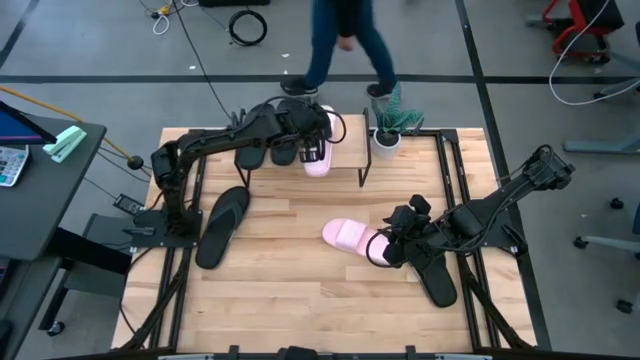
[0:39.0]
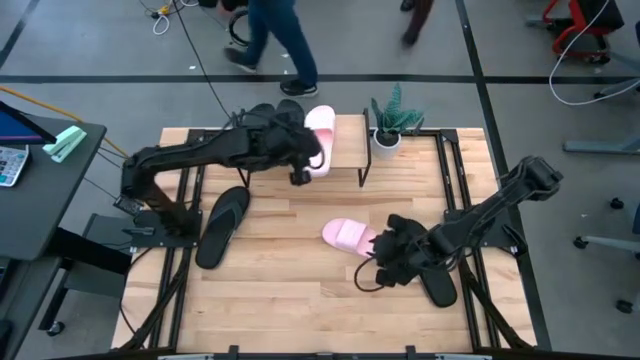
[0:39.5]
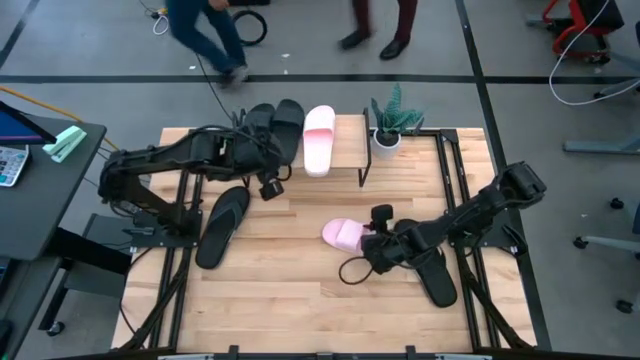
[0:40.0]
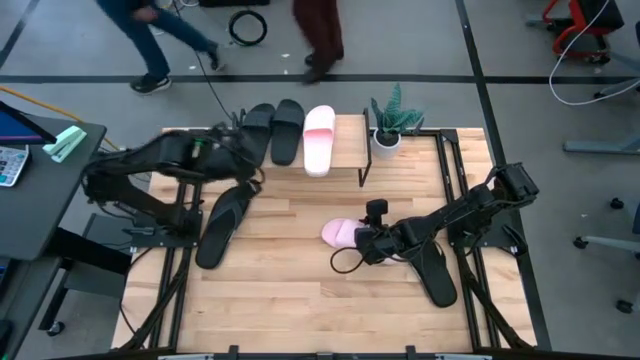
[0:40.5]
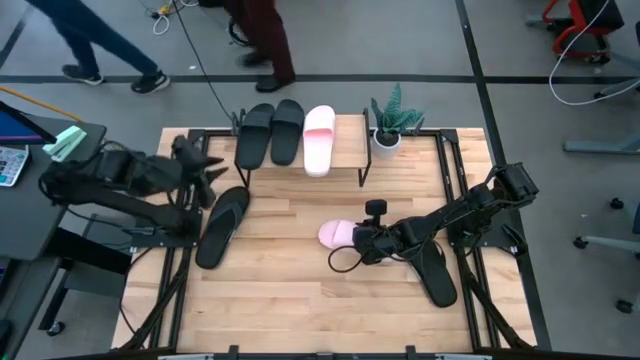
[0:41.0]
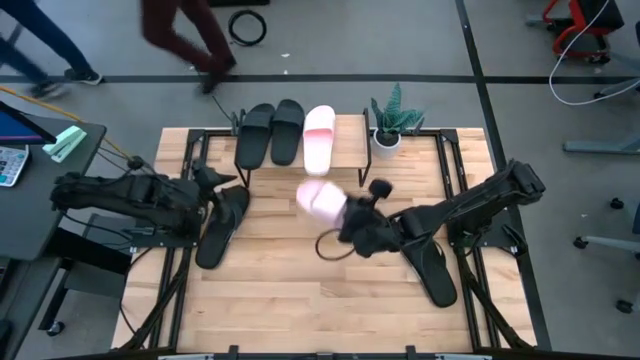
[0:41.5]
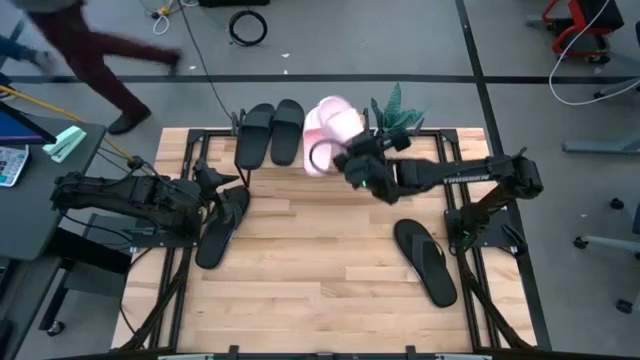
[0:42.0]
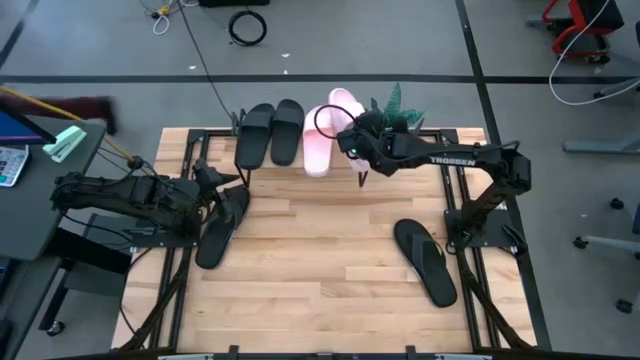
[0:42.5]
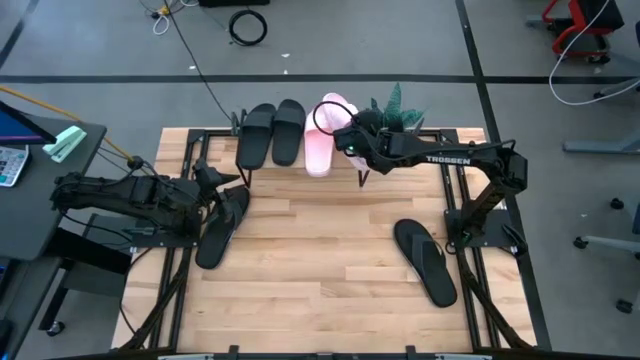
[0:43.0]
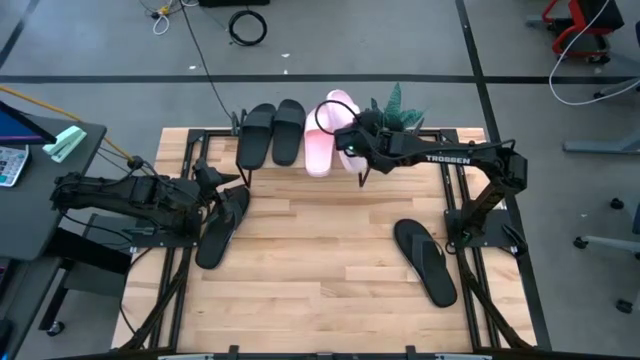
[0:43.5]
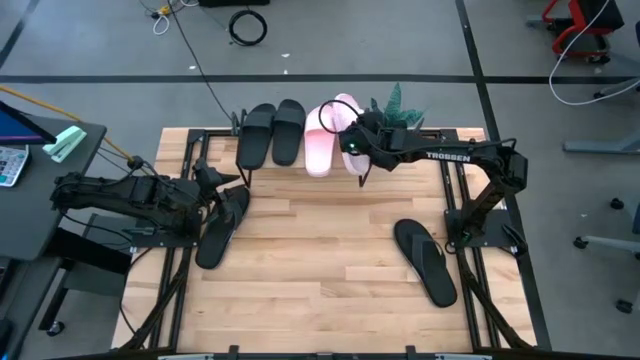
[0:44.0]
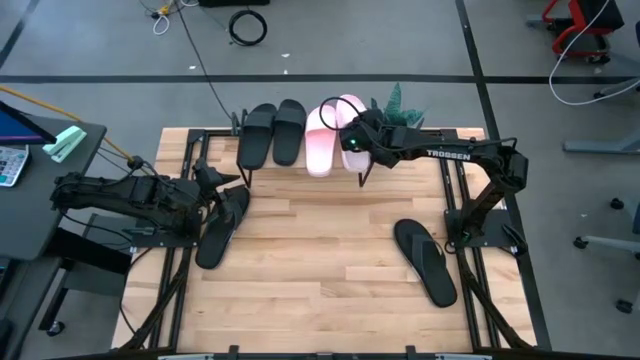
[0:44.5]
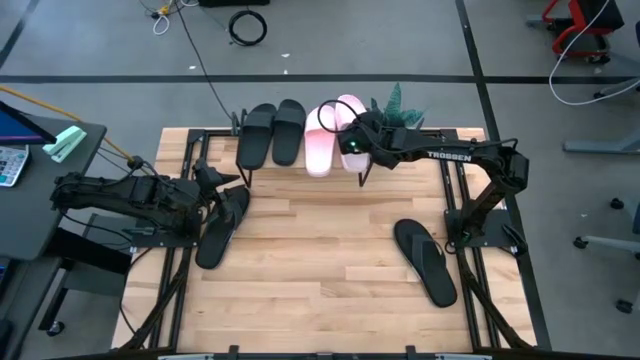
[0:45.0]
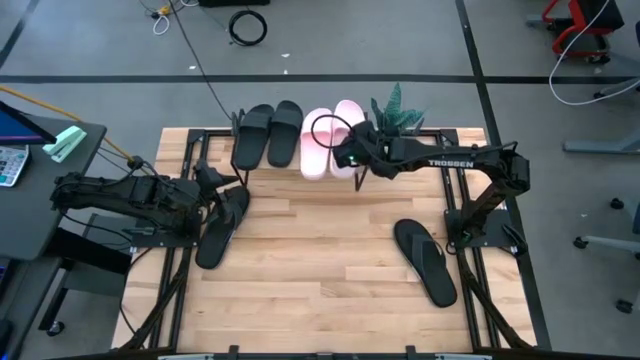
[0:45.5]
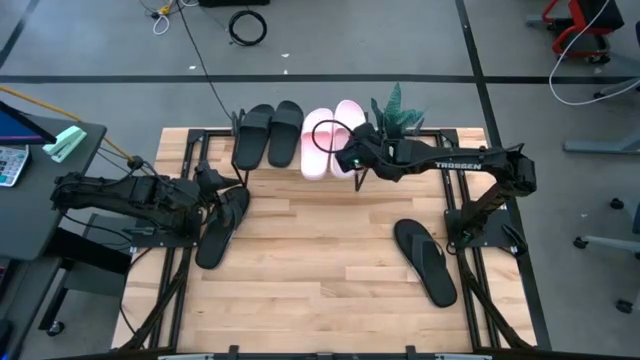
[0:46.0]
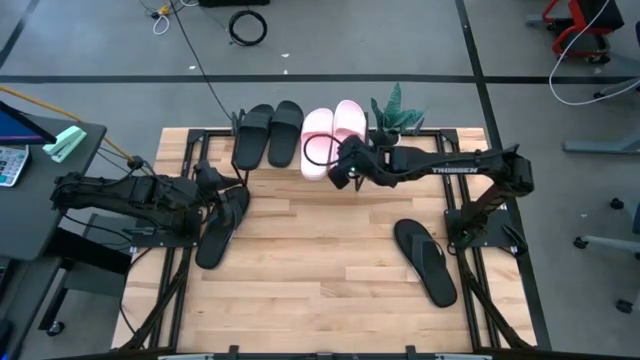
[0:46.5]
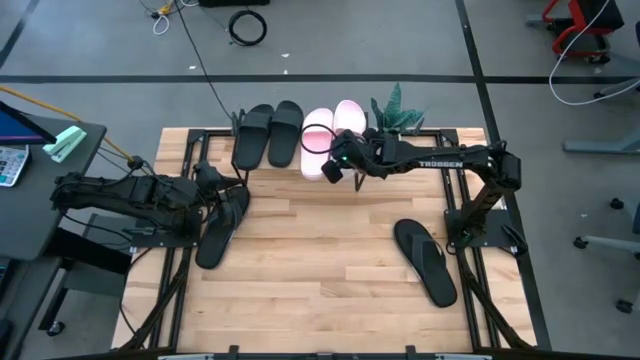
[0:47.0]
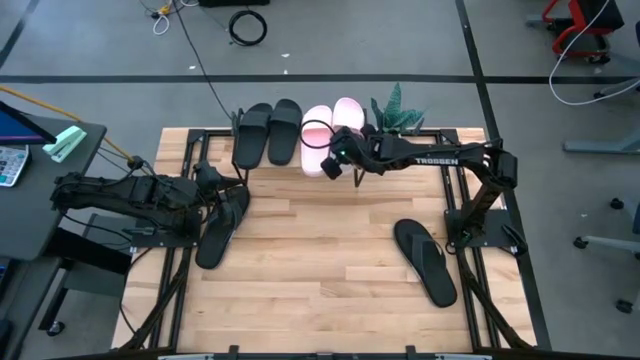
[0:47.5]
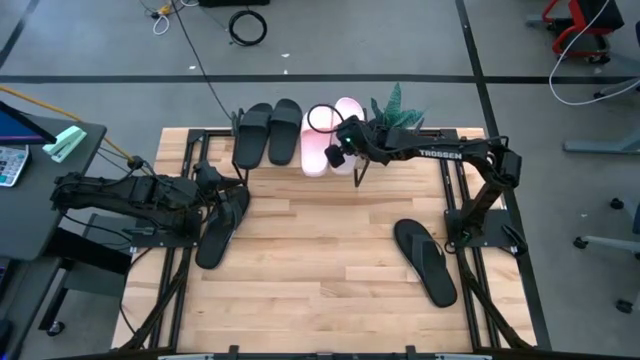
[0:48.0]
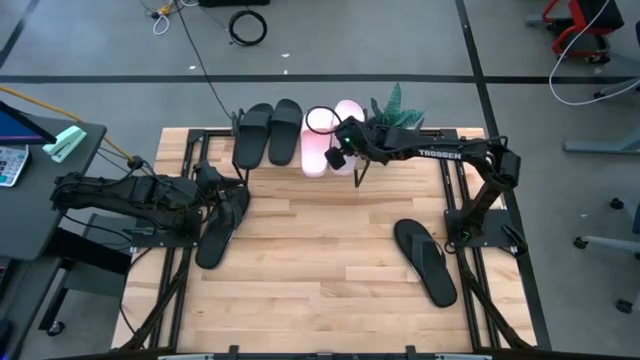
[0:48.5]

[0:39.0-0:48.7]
Task: Pick and place slides into the shelf
Put the pink slides on the shelf

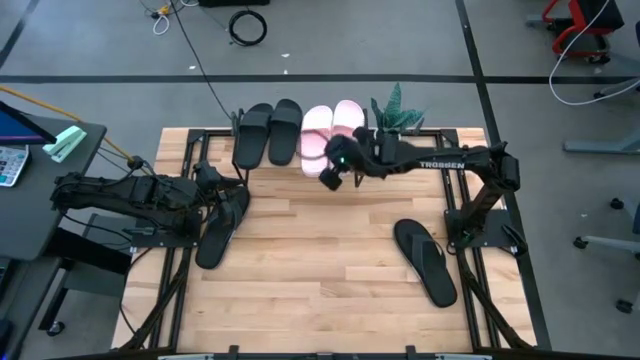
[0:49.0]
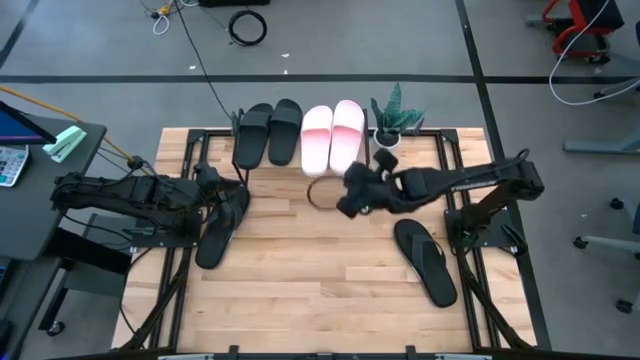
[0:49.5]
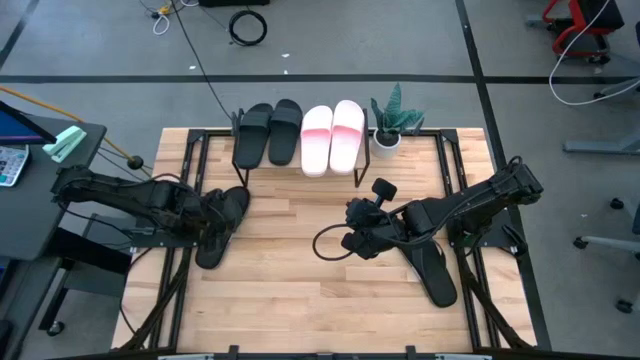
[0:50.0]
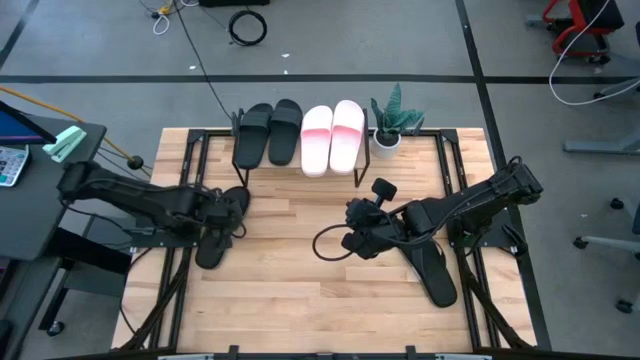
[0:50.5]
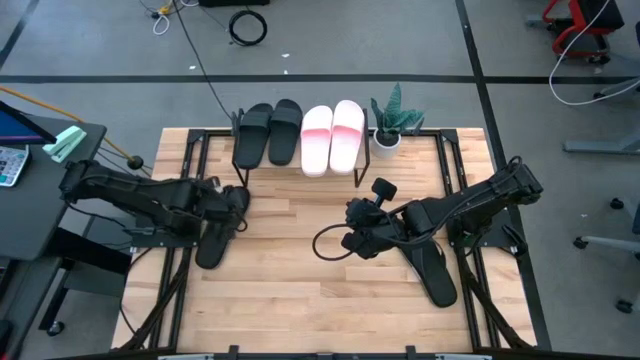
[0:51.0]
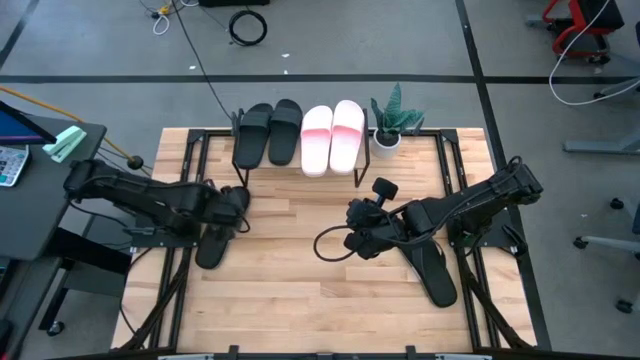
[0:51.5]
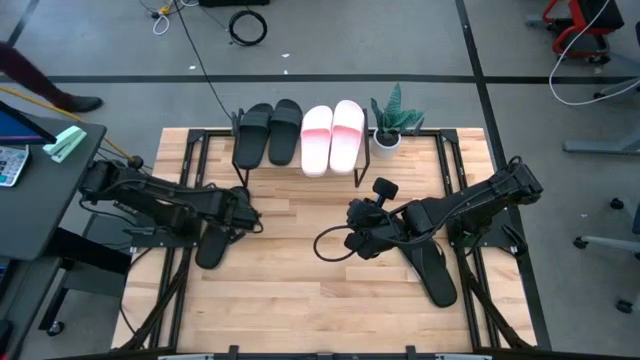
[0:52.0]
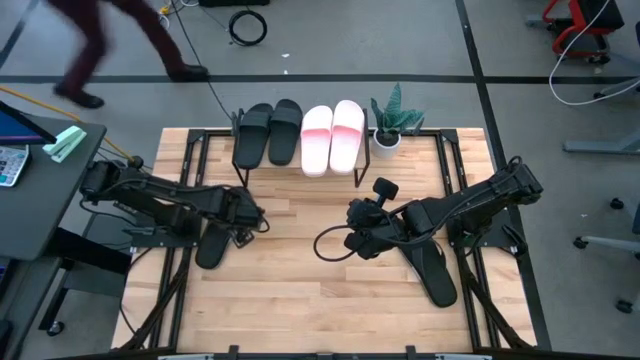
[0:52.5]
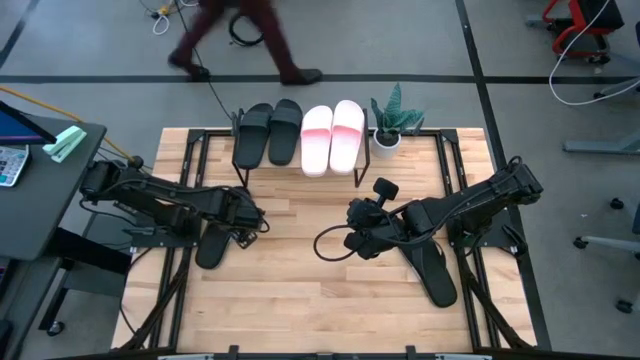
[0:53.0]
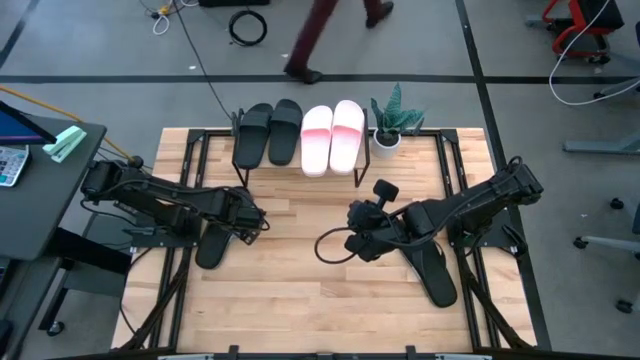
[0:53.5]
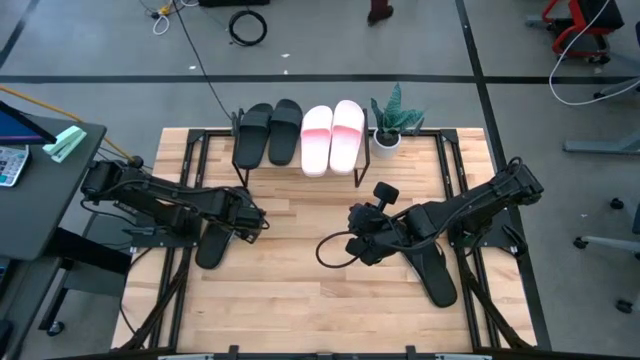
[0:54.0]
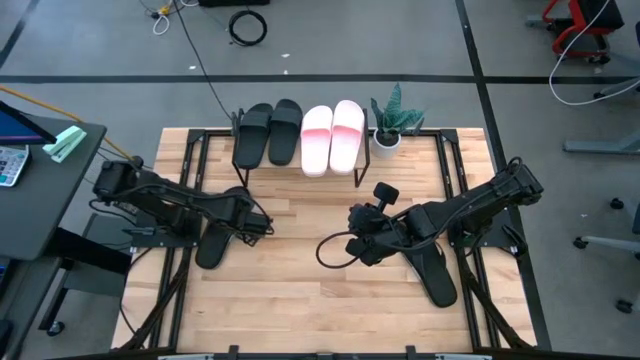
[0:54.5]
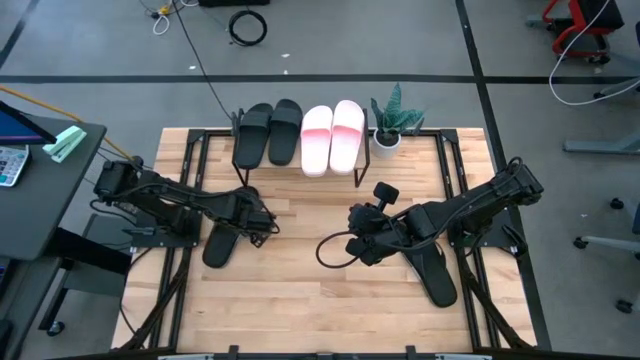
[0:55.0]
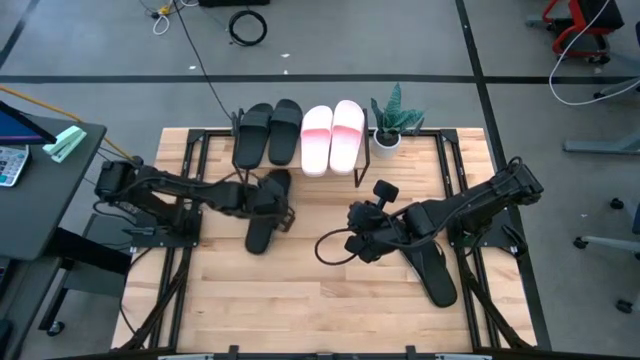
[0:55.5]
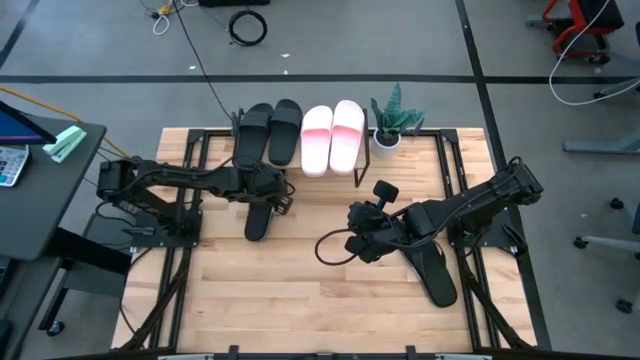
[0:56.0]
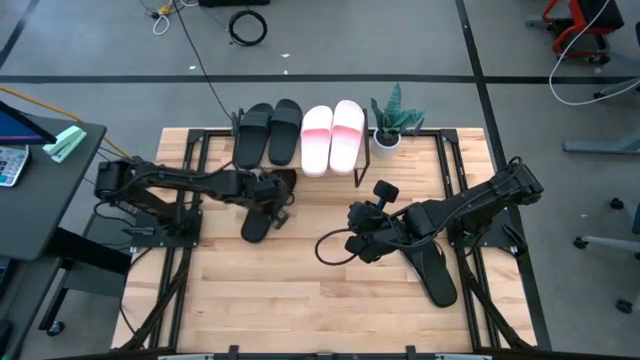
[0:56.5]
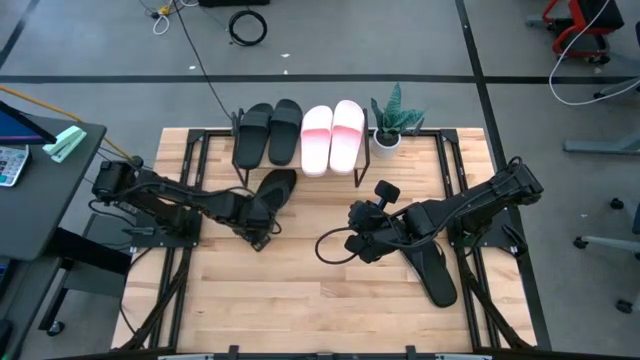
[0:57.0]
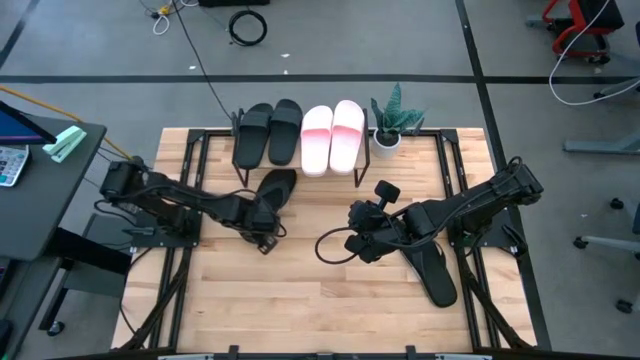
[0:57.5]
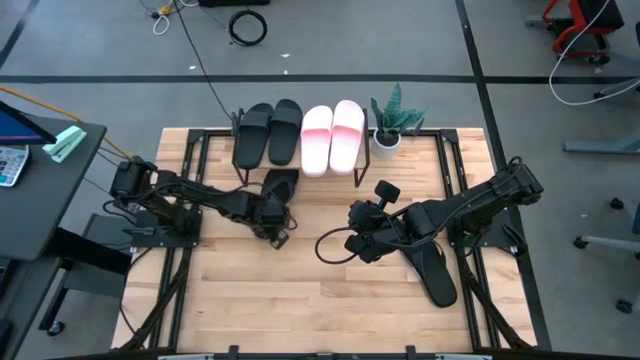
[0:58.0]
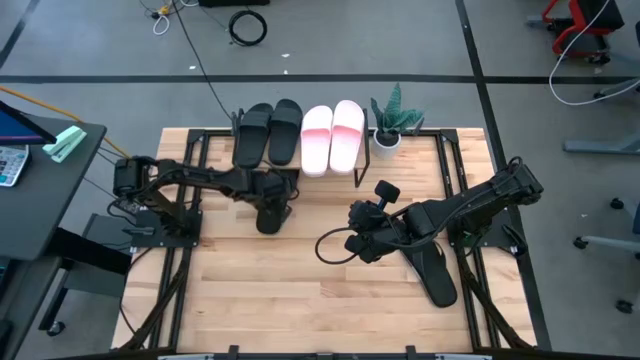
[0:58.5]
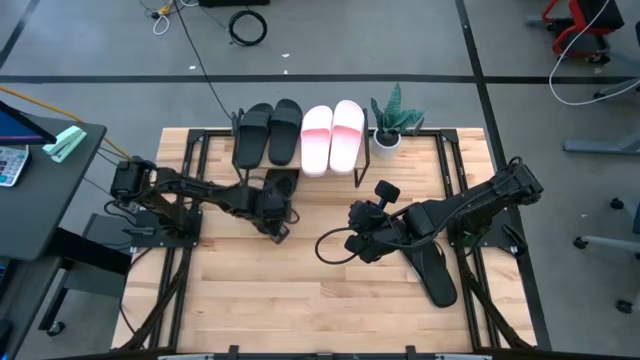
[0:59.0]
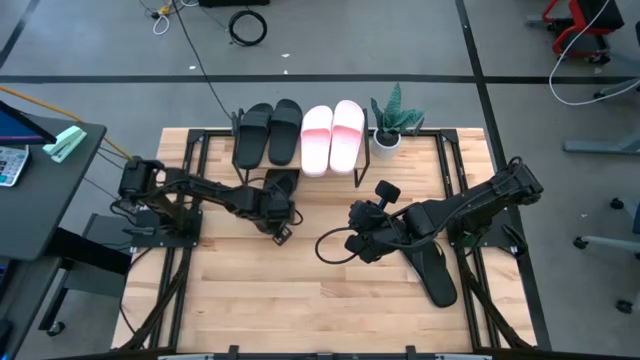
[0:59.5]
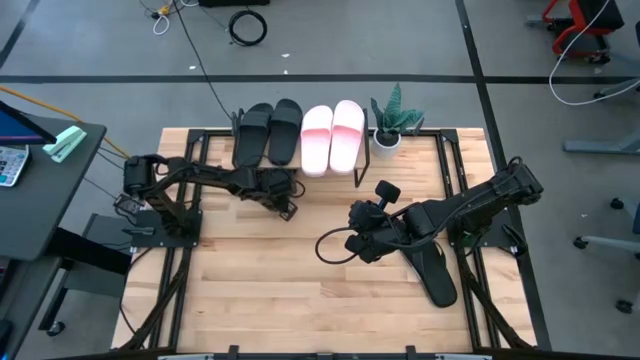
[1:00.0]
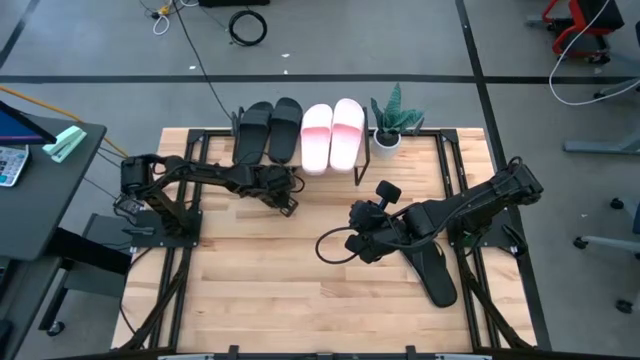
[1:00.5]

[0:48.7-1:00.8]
Put the left black slipper under the shelf
